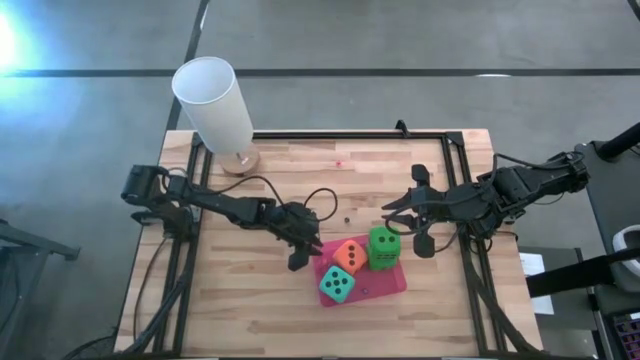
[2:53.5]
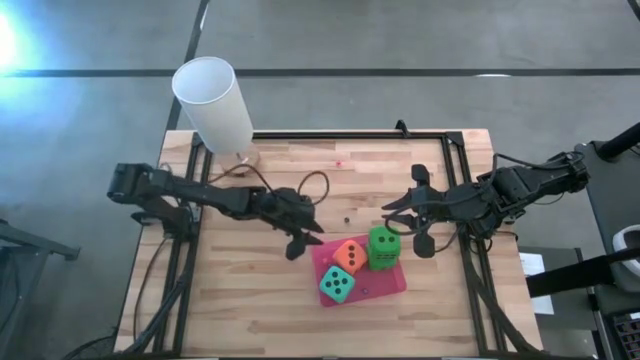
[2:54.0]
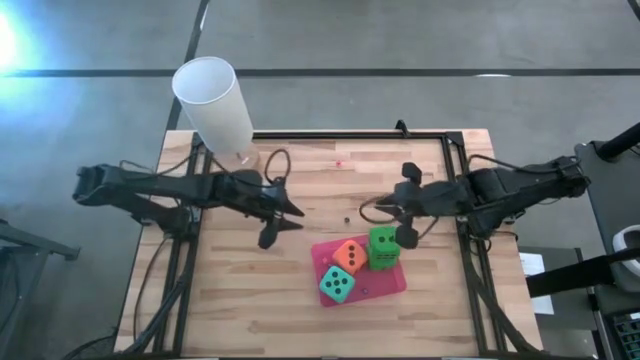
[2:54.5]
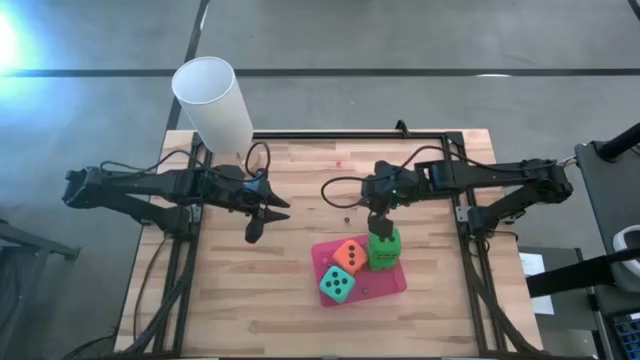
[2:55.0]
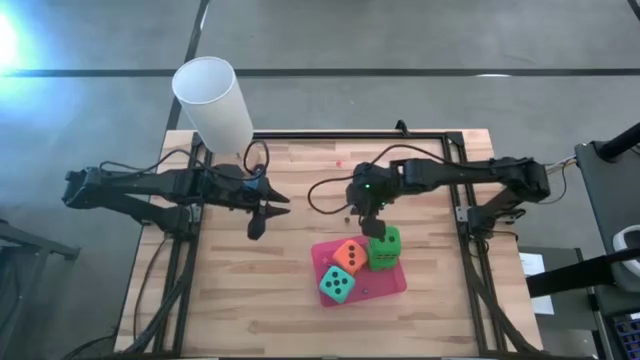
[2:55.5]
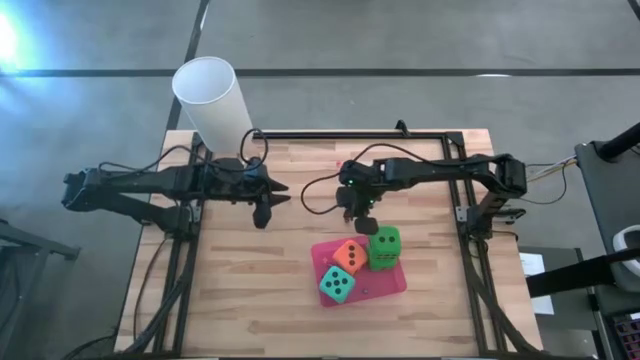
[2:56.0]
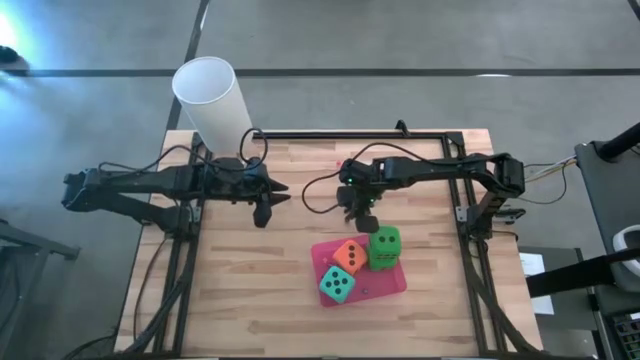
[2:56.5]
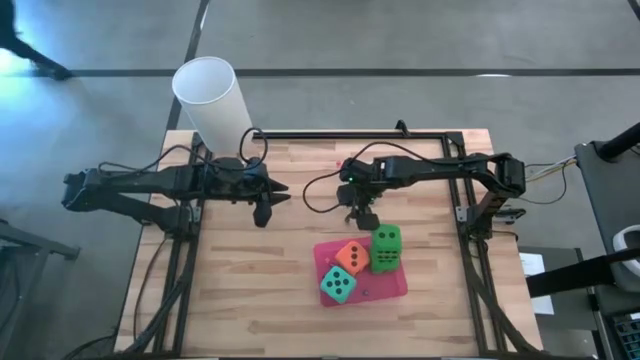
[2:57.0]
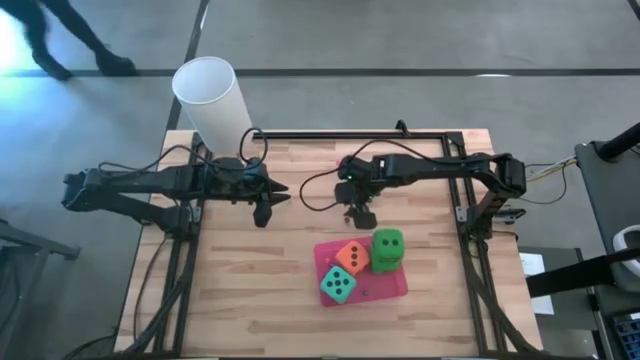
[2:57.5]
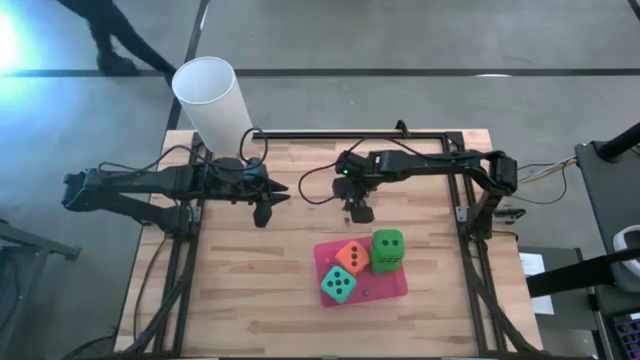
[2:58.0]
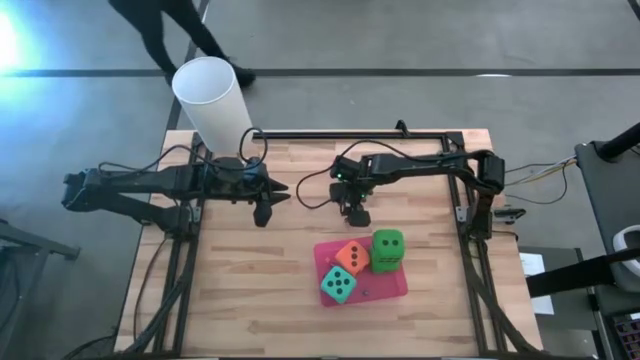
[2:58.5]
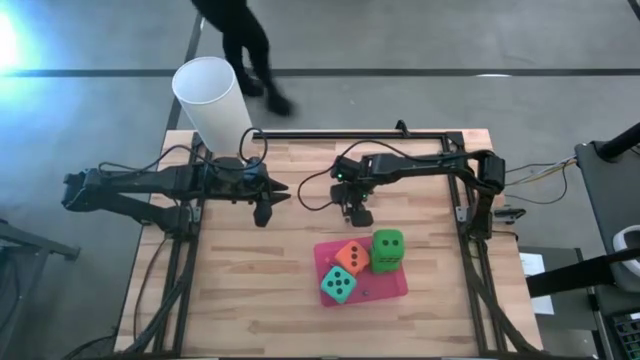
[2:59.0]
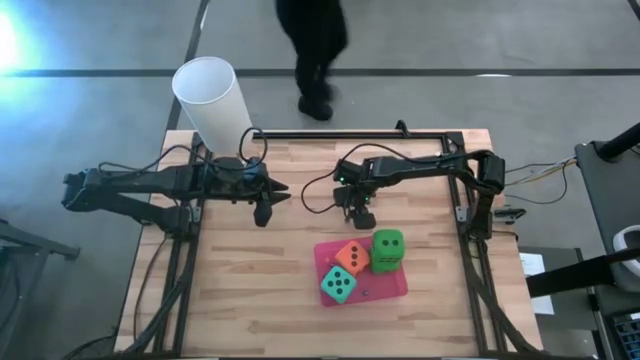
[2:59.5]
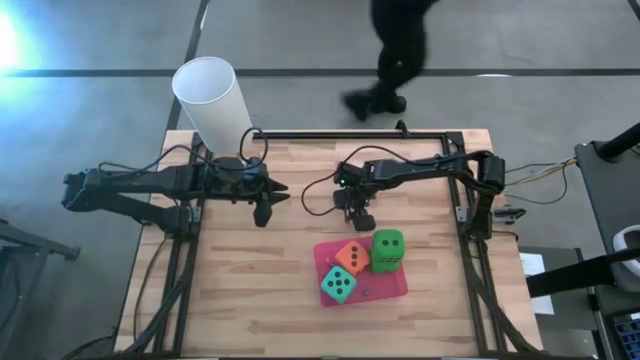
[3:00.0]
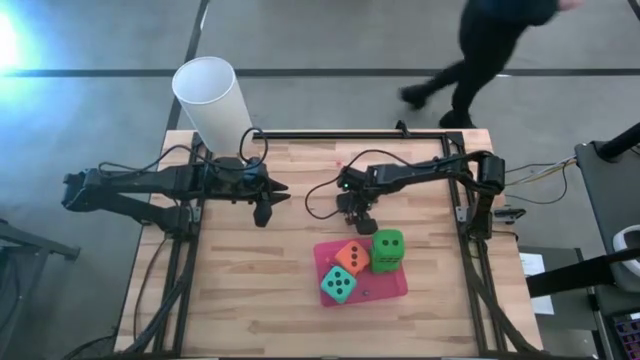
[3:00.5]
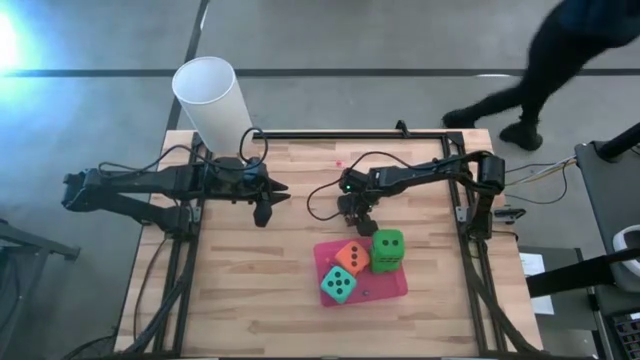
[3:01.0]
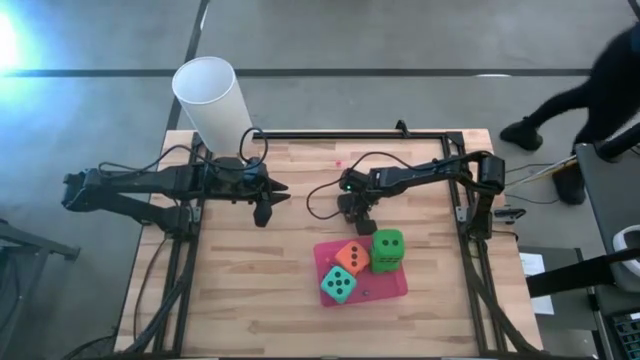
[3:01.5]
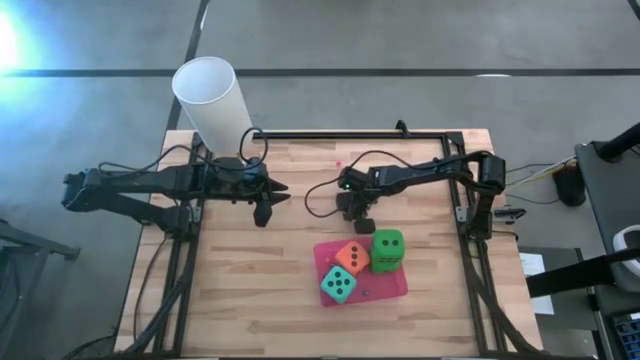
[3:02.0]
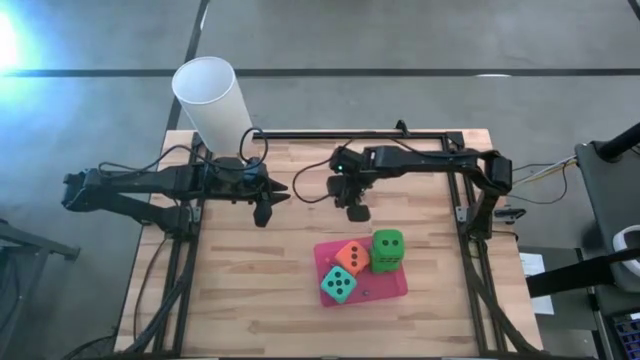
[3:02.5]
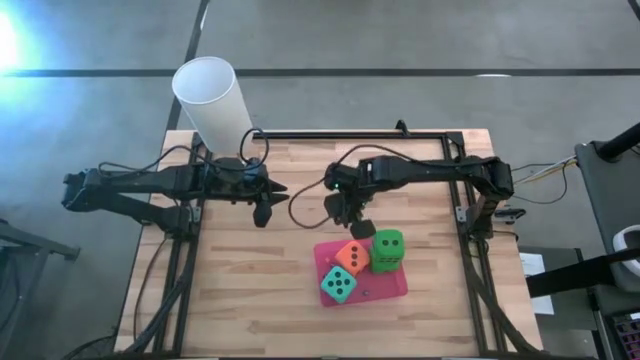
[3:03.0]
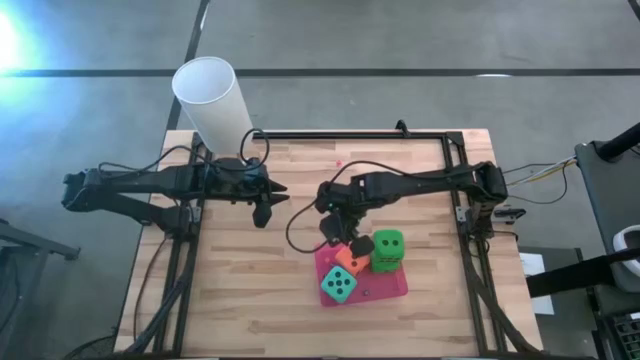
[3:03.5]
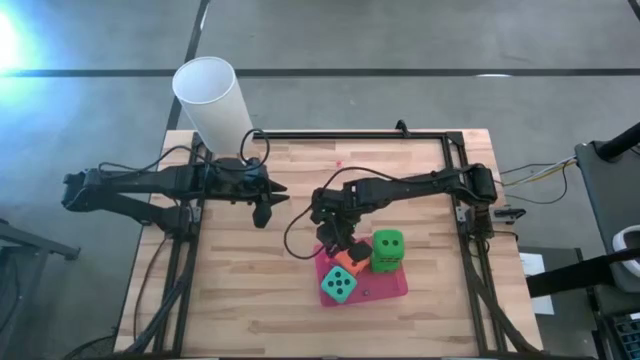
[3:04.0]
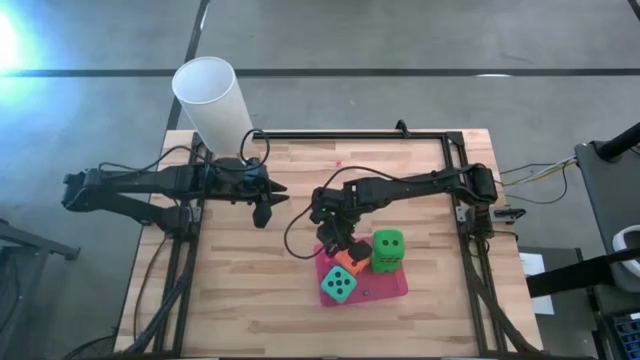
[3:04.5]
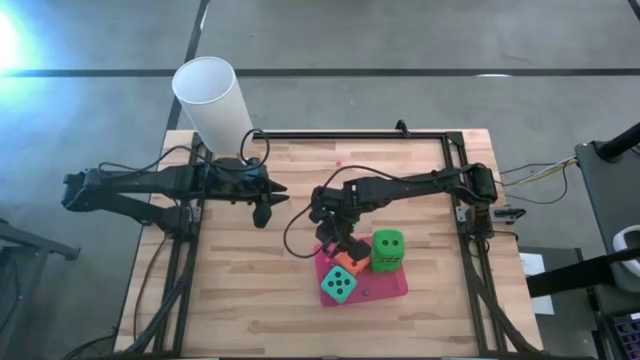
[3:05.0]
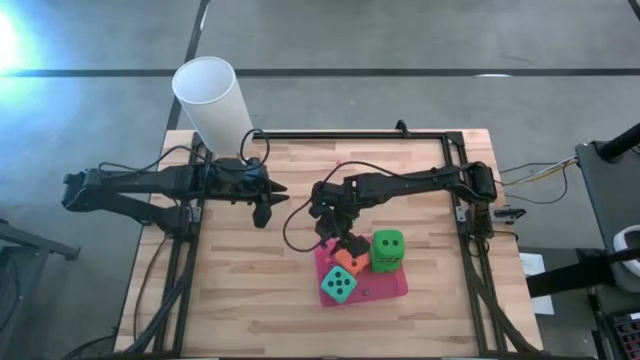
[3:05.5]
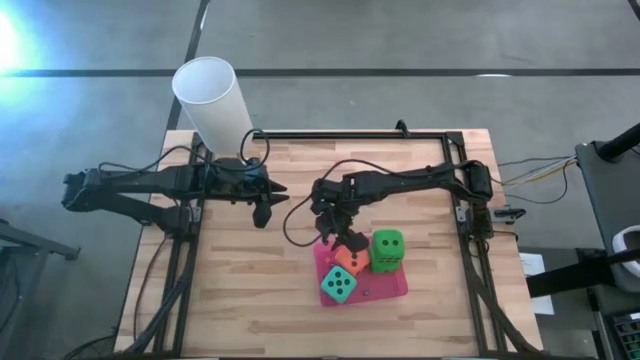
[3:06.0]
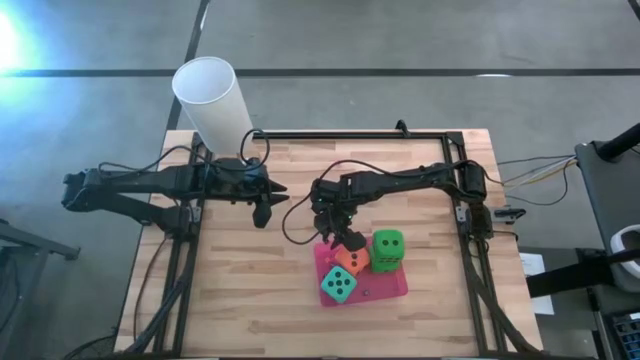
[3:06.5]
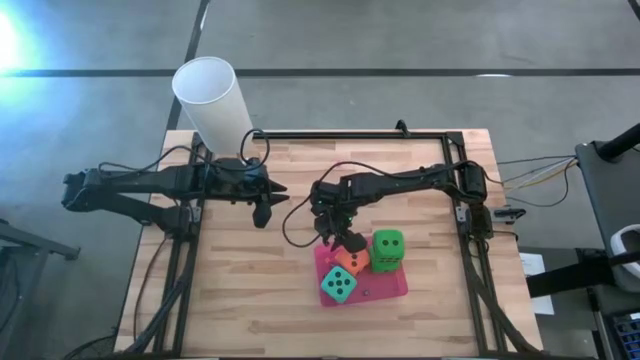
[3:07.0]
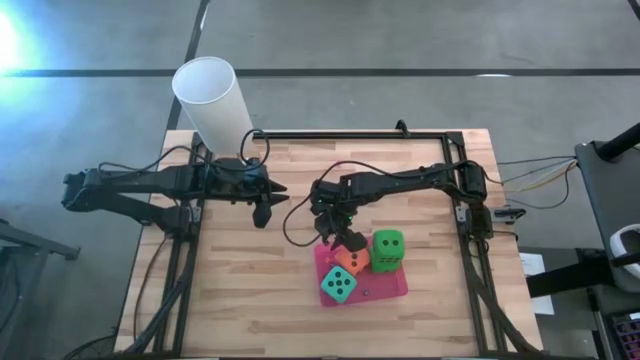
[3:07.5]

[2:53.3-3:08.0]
Task: Pick & Place Dice
Put the small black dice into the pink bin

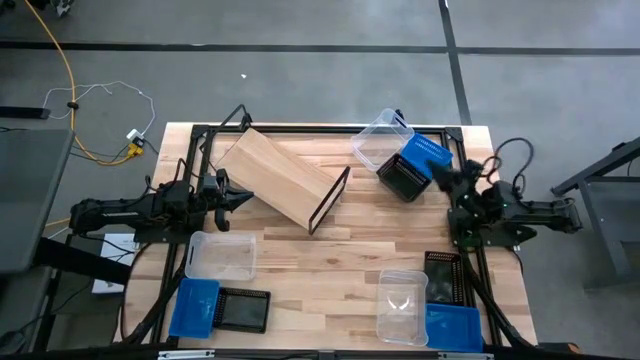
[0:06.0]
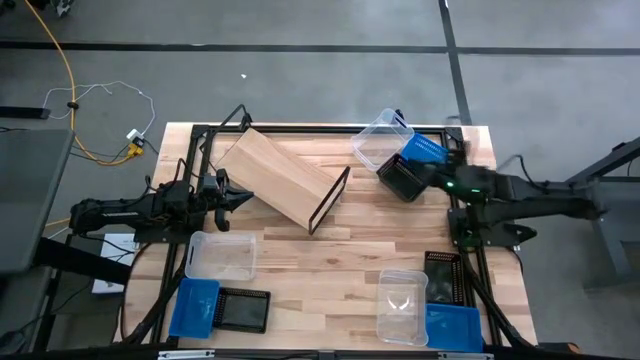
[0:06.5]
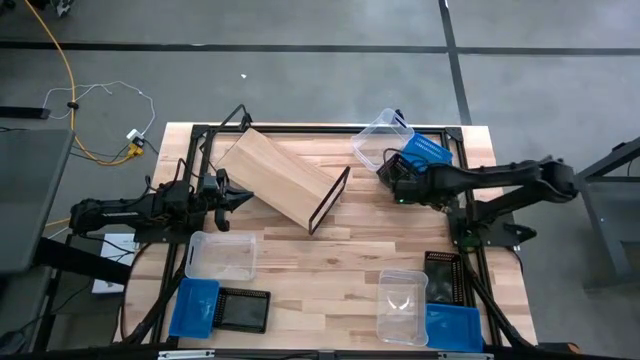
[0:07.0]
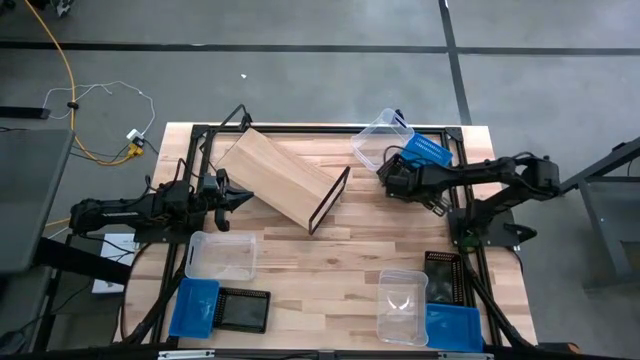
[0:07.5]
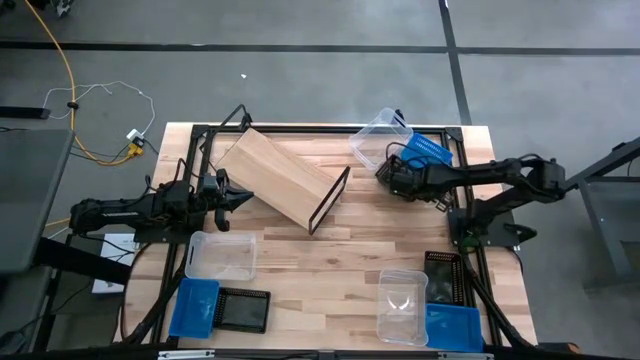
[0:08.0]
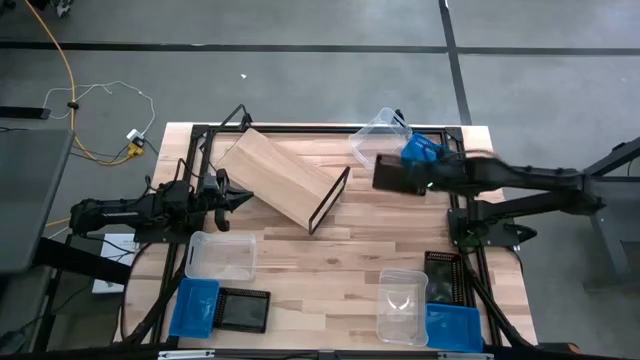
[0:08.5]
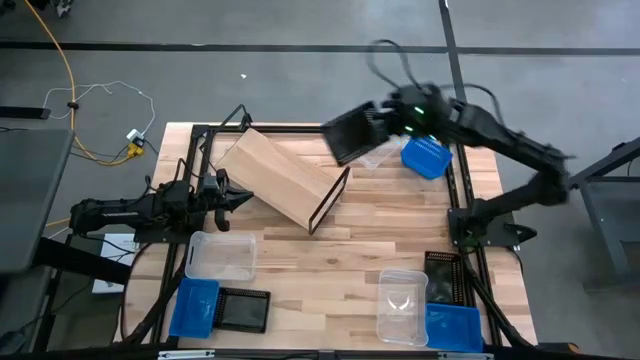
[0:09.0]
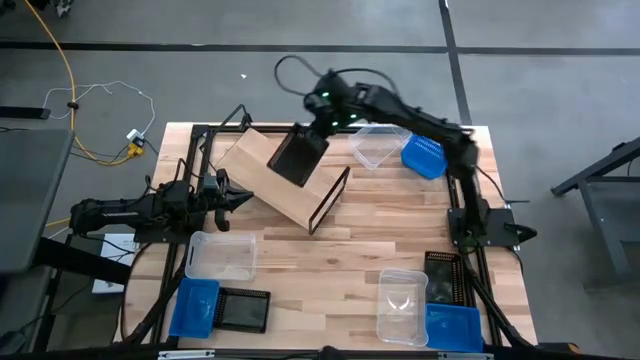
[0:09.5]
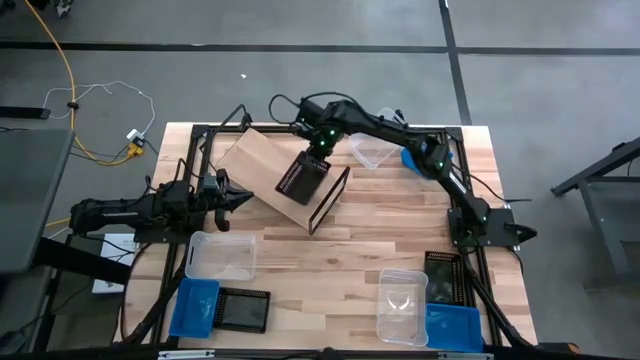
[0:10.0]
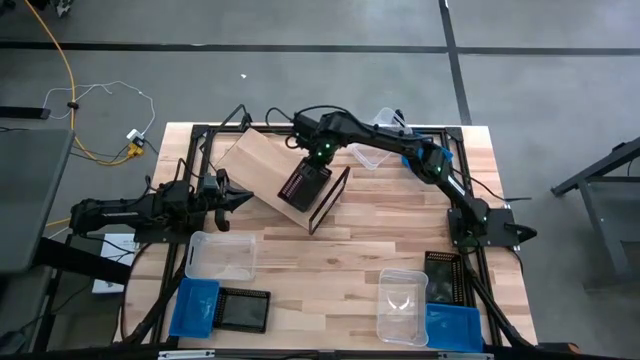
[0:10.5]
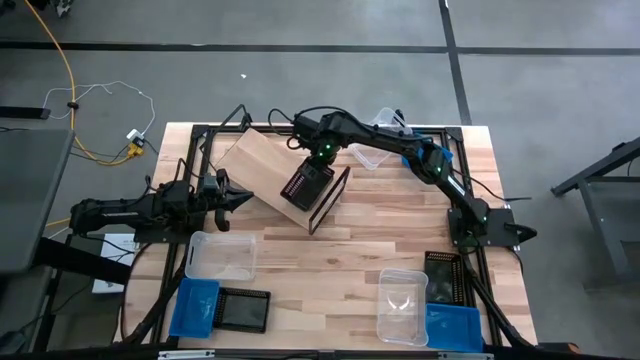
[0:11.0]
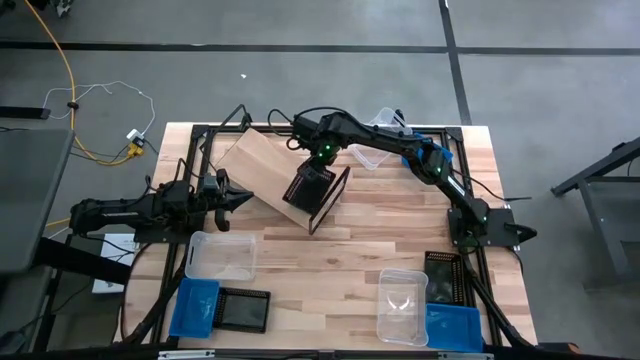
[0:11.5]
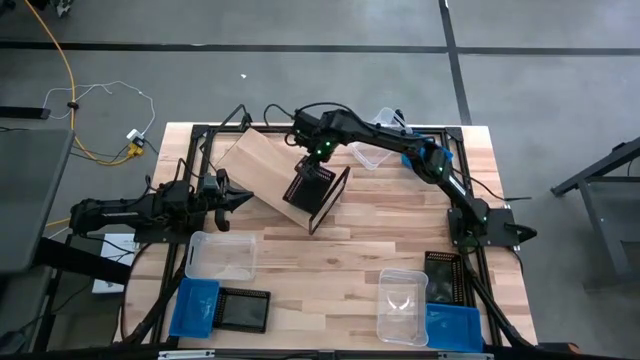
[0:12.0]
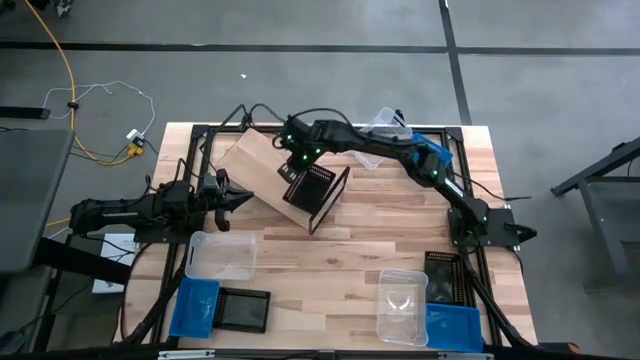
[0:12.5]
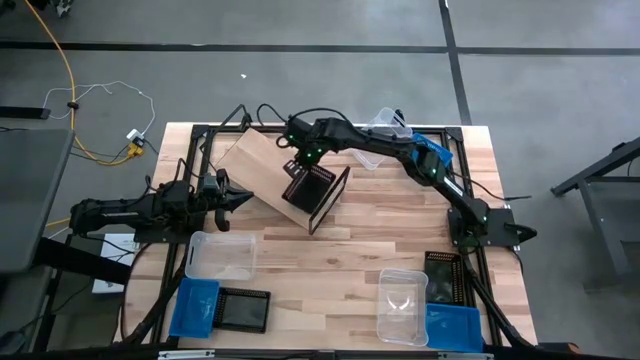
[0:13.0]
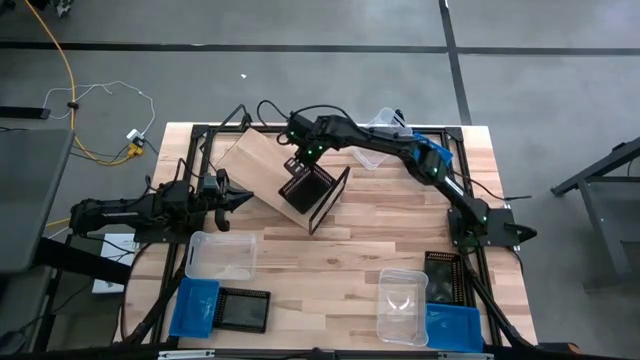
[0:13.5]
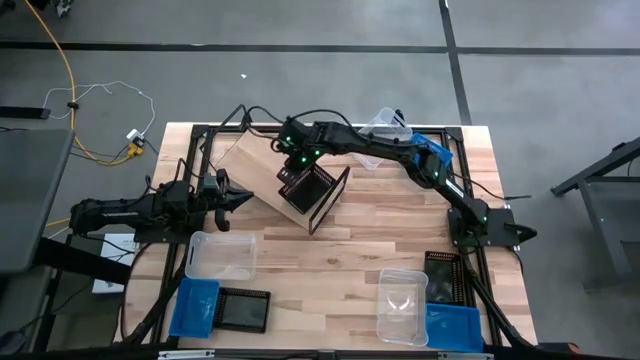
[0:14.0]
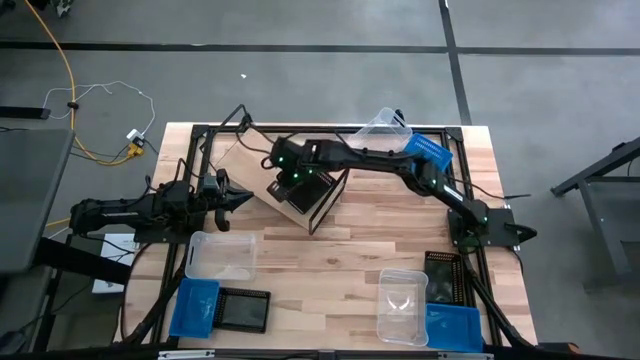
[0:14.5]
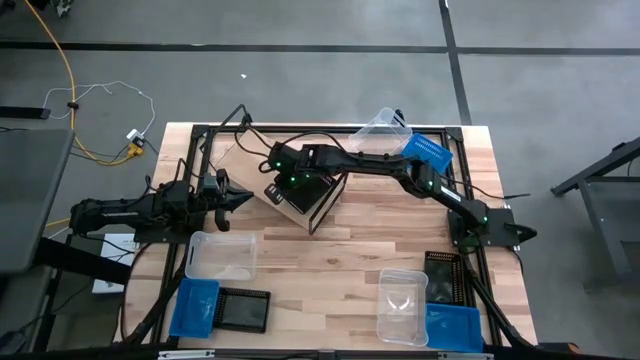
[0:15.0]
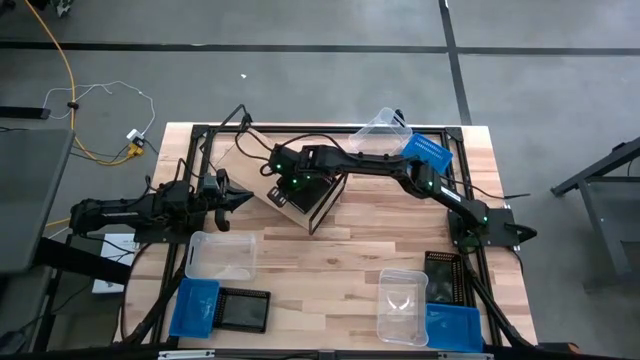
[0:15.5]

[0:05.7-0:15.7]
Task: Stack baskets on shelf by color
Put the top black bin on the shelf
